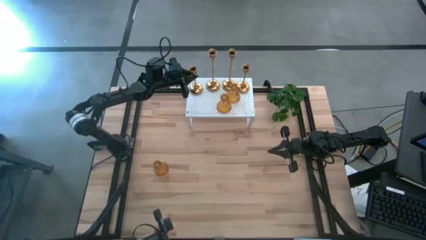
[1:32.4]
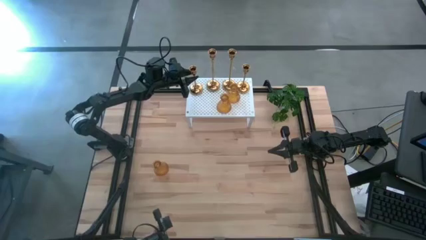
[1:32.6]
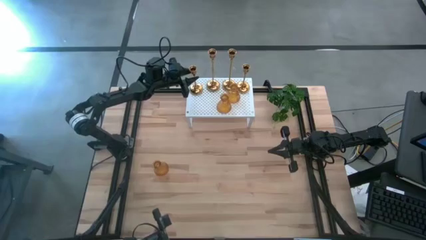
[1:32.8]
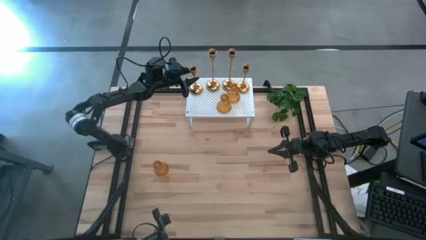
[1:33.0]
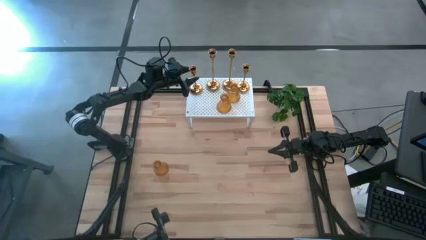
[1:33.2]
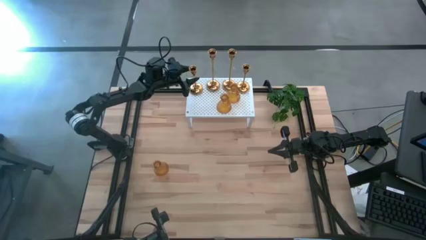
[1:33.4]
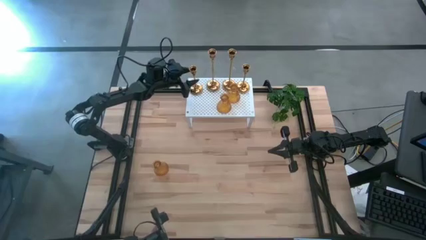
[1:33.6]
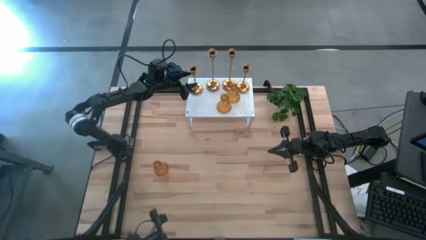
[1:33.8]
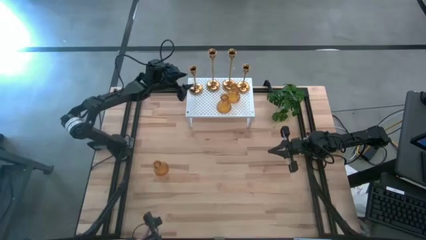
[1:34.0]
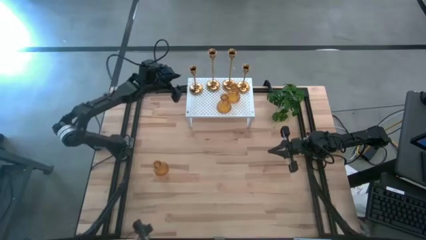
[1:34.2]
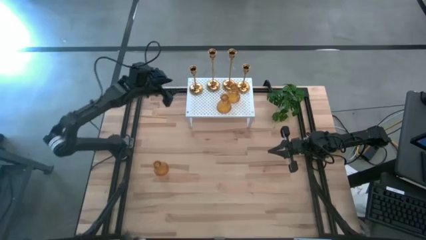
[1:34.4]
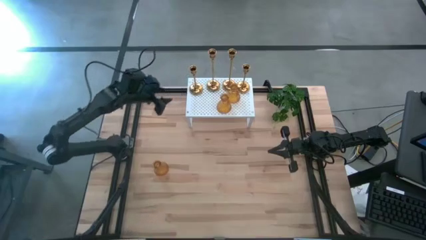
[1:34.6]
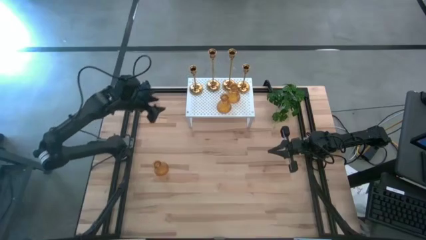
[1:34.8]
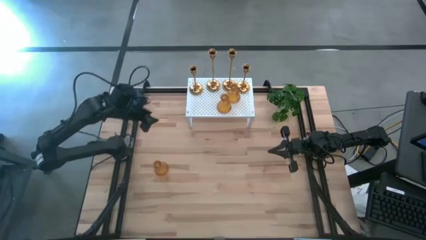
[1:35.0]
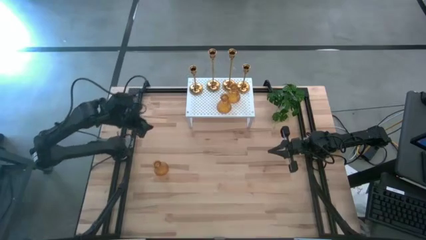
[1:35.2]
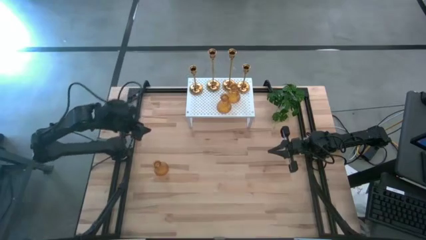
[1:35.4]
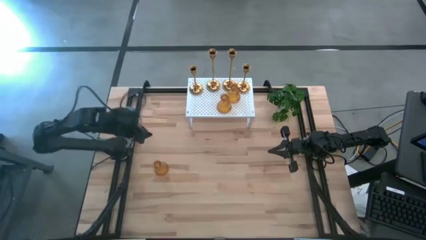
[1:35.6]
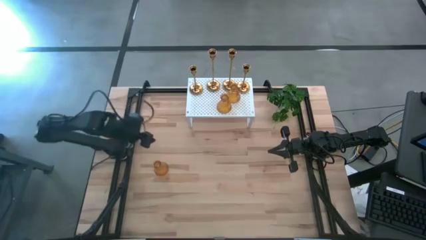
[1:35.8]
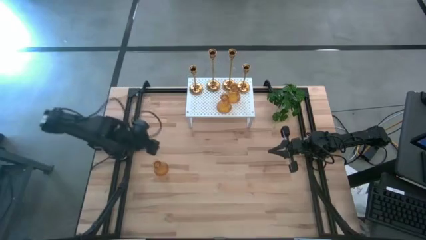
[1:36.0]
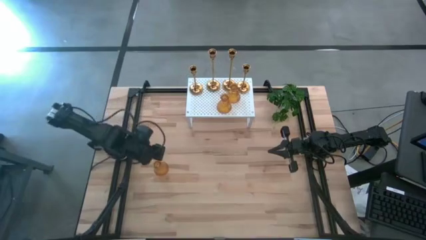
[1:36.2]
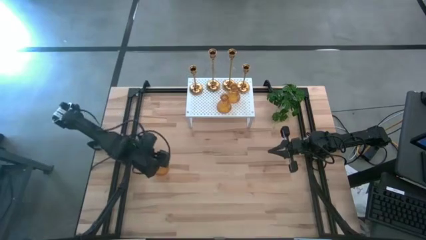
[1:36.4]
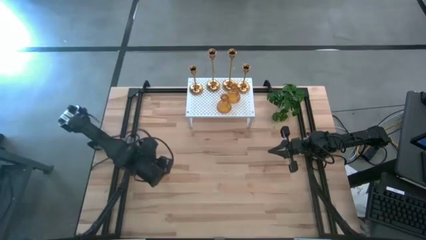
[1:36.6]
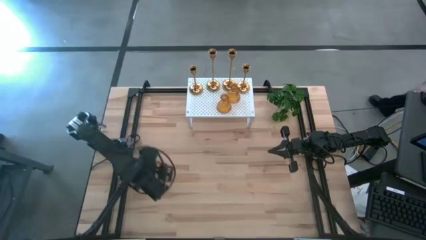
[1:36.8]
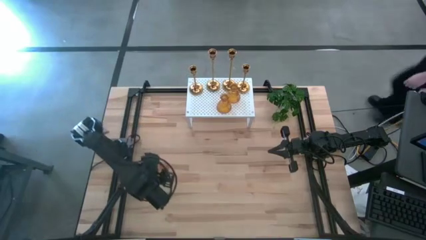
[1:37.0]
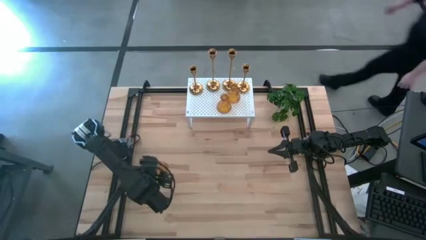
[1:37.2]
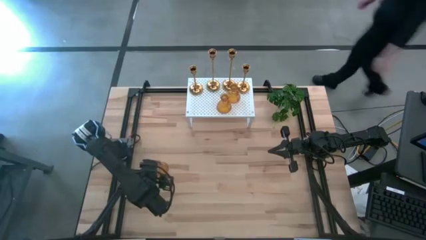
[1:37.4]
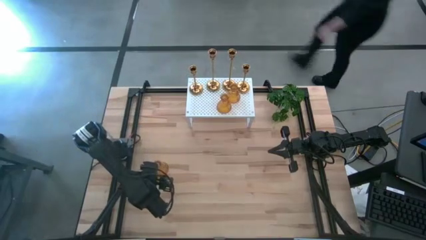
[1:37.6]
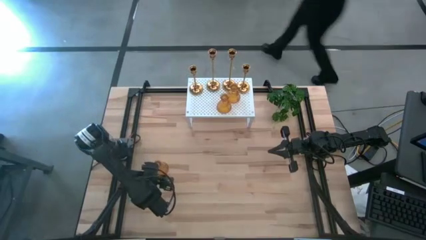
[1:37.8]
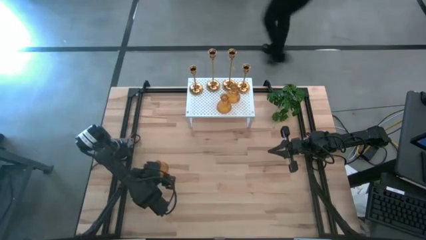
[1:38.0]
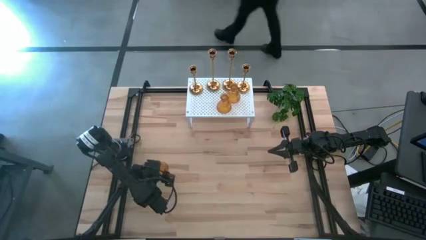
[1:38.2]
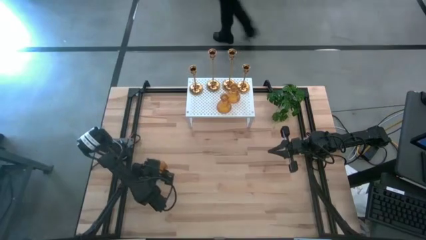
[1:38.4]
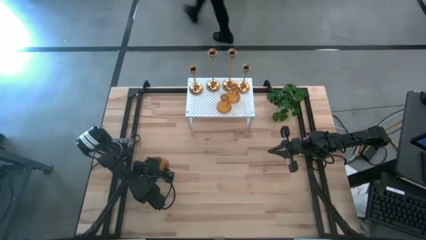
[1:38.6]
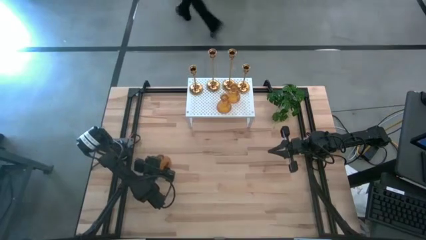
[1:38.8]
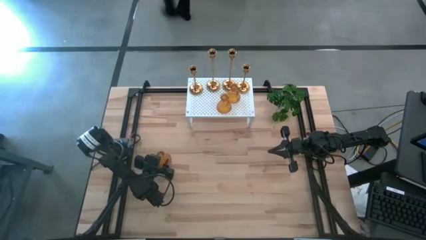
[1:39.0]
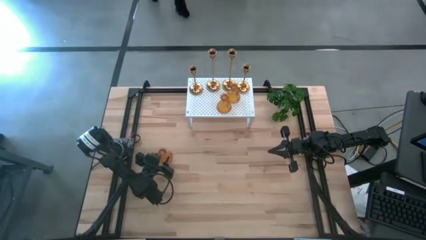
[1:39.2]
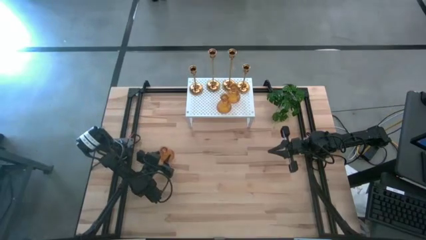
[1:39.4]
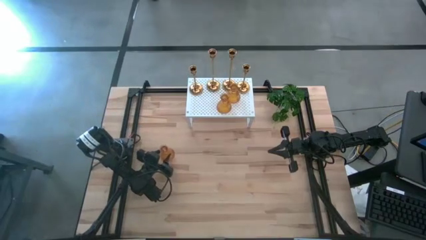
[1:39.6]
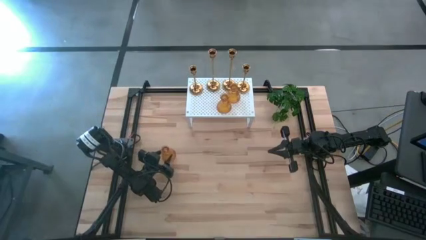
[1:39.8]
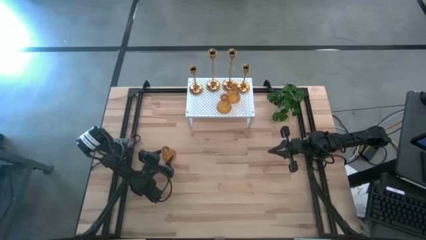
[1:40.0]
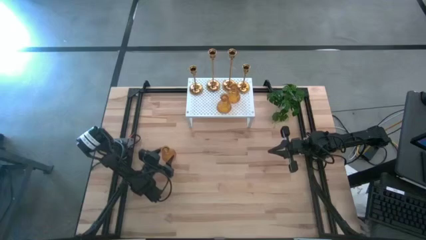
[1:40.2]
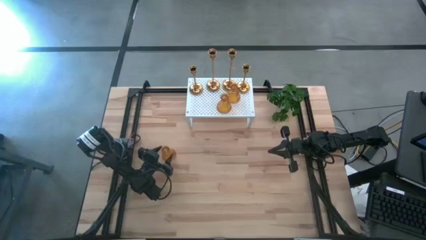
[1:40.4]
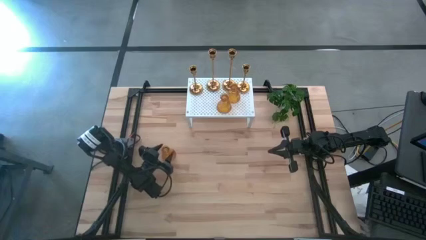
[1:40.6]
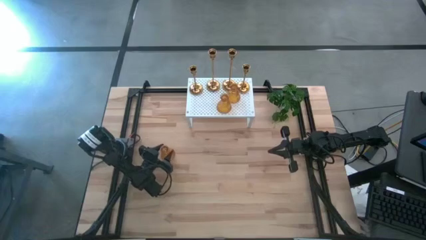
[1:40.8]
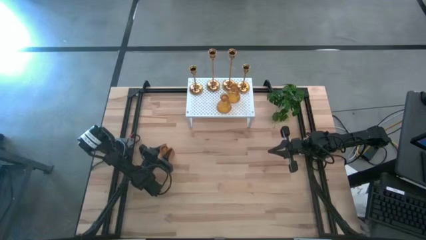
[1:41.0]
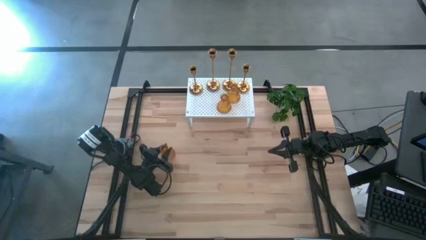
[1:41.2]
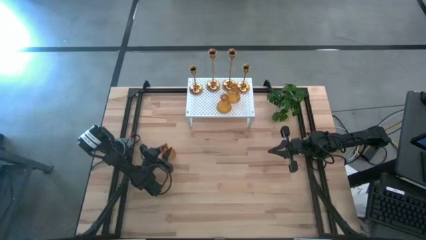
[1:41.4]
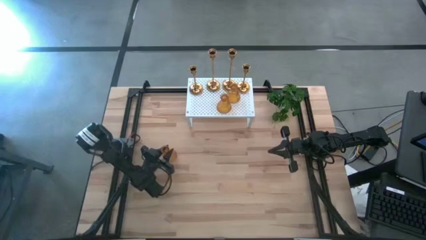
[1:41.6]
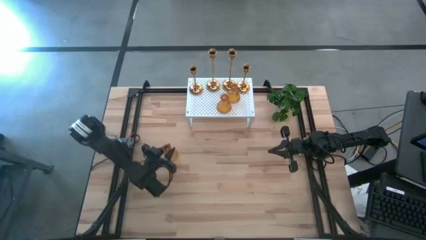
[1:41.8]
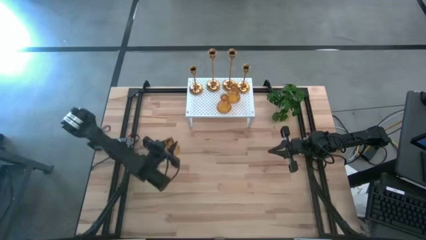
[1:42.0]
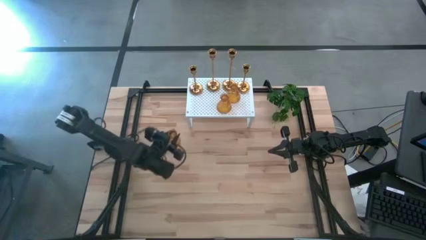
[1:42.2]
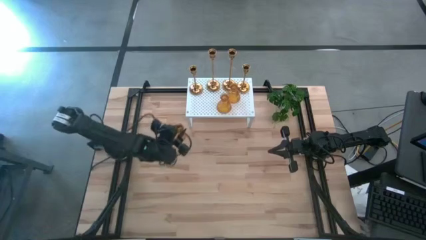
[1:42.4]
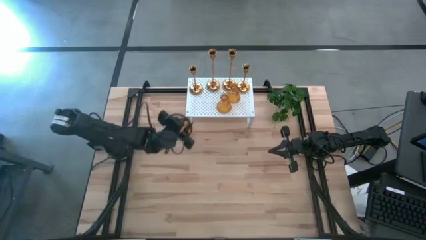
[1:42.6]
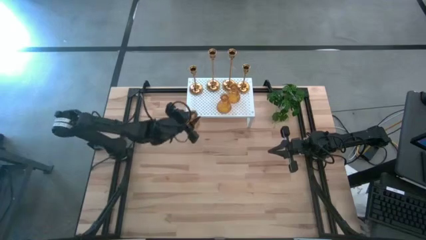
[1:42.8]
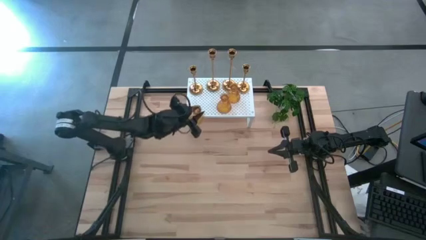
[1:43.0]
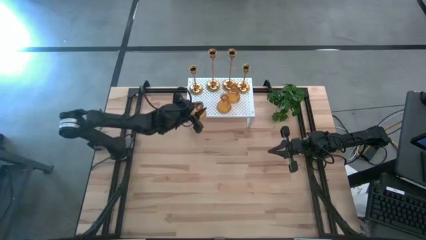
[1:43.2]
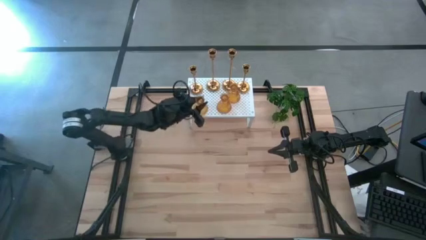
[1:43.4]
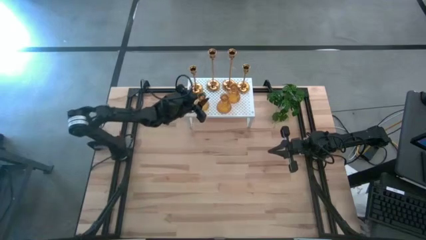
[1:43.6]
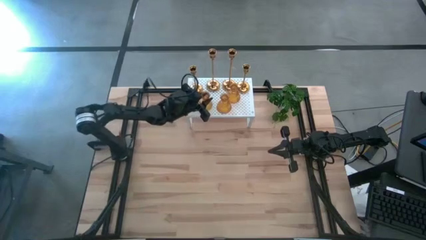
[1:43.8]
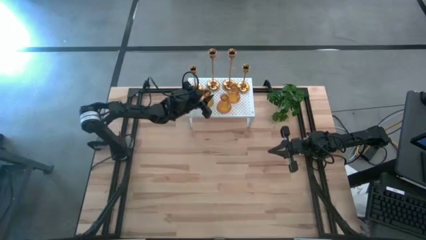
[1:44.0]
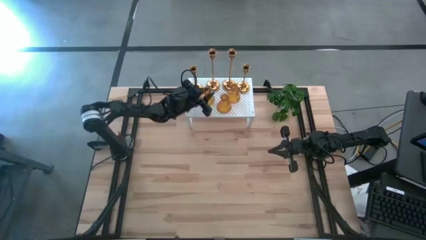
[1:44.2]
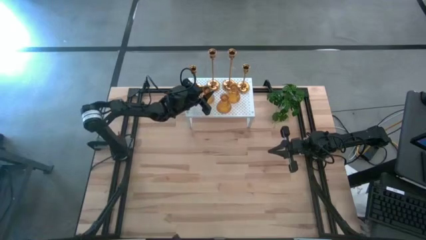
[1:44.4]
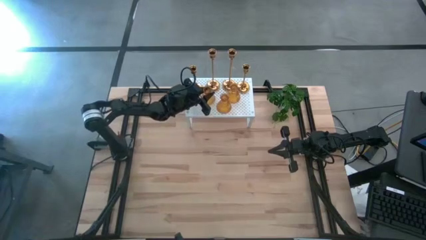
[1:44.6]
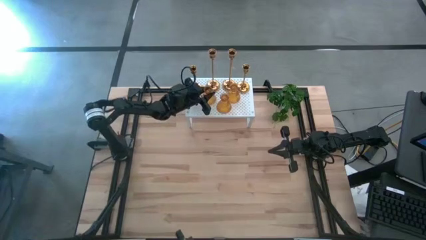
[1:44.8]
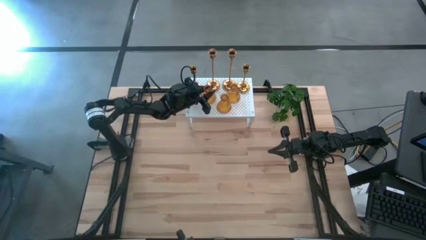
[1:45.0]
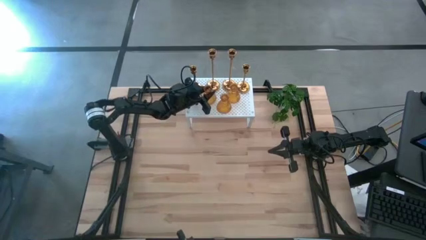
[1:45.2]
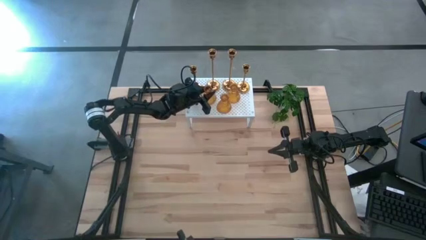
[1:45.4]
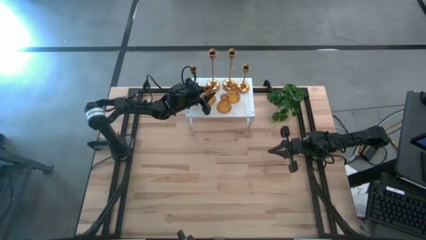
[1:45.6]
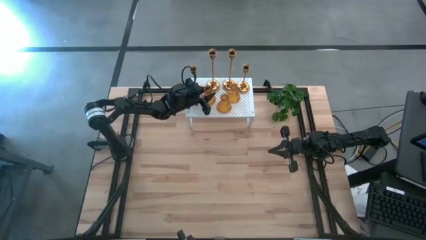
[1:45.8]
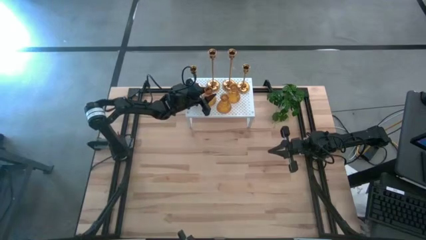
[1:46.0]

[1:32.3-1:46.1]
Task: Pick & Place candle stick holders
Put the orange candle holder on the shelf
